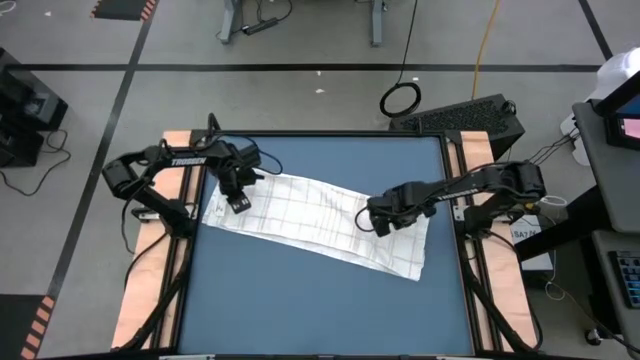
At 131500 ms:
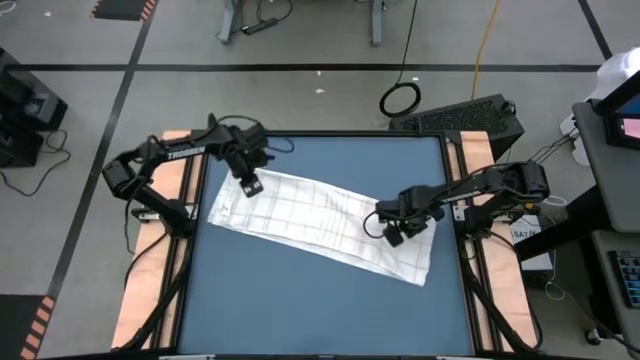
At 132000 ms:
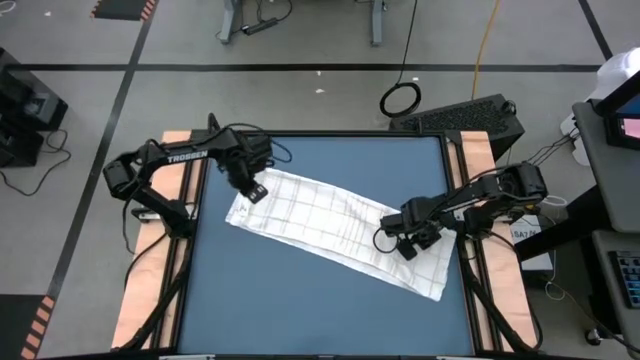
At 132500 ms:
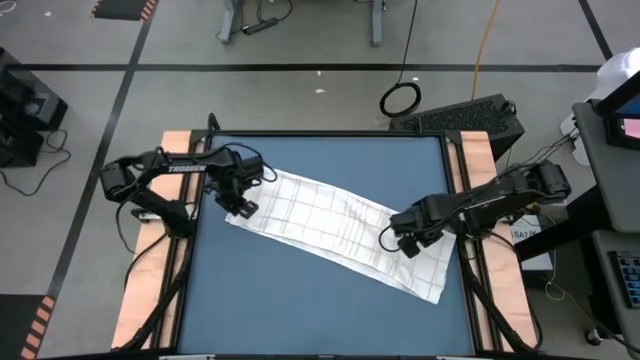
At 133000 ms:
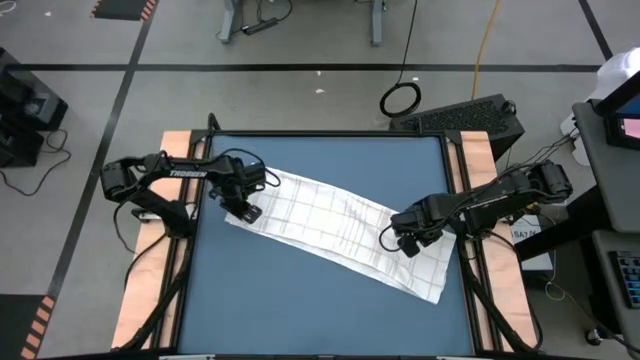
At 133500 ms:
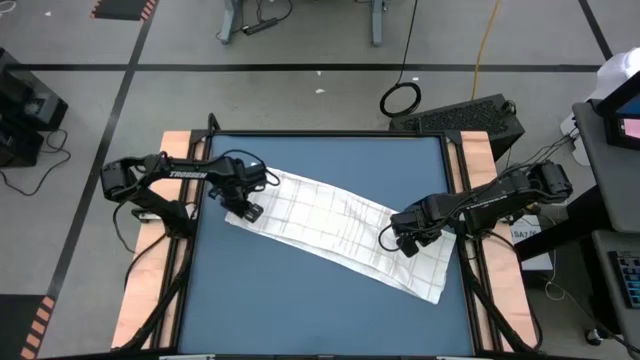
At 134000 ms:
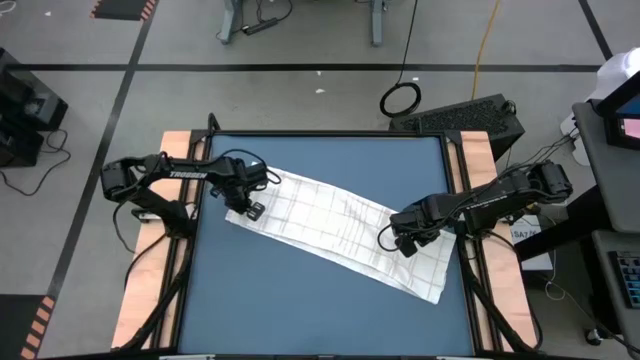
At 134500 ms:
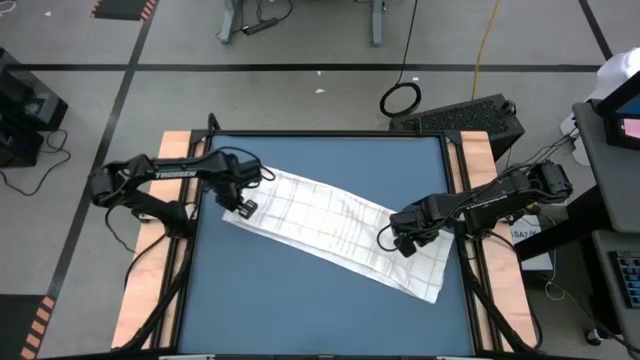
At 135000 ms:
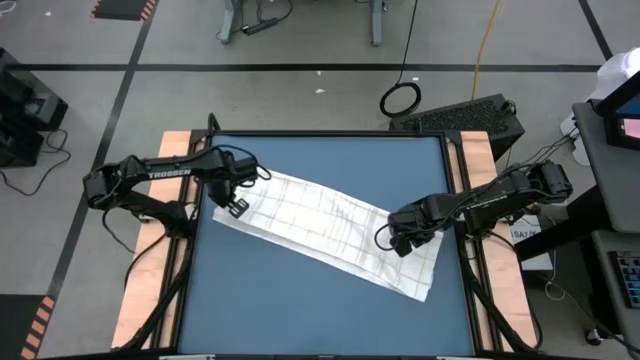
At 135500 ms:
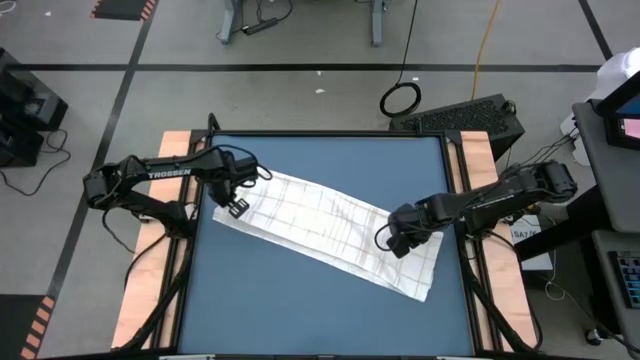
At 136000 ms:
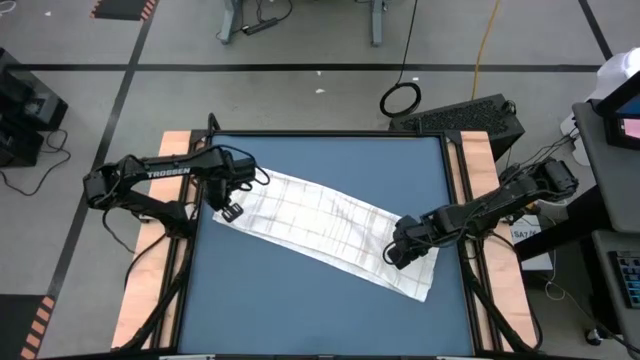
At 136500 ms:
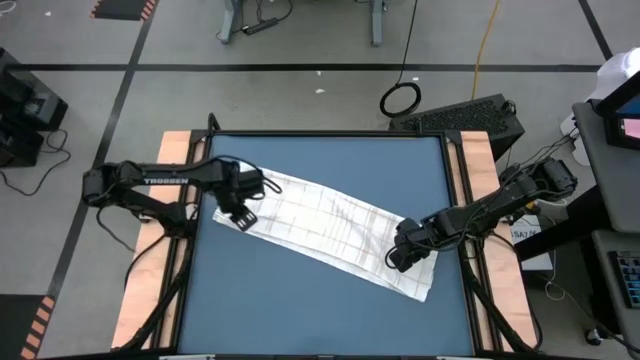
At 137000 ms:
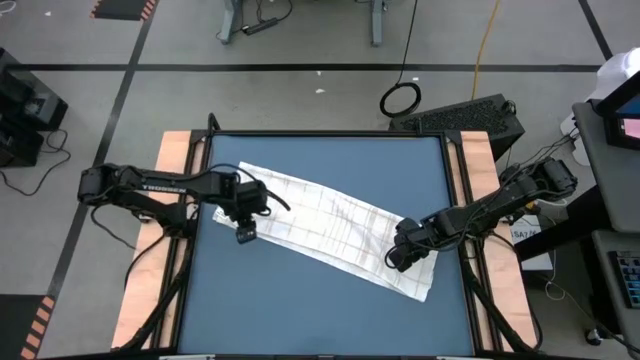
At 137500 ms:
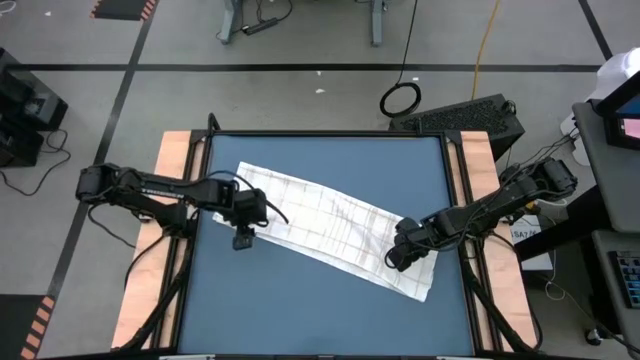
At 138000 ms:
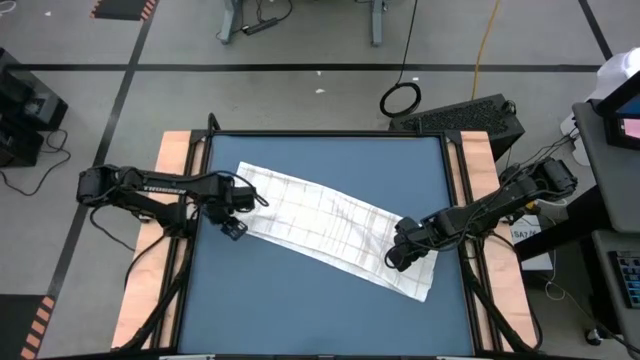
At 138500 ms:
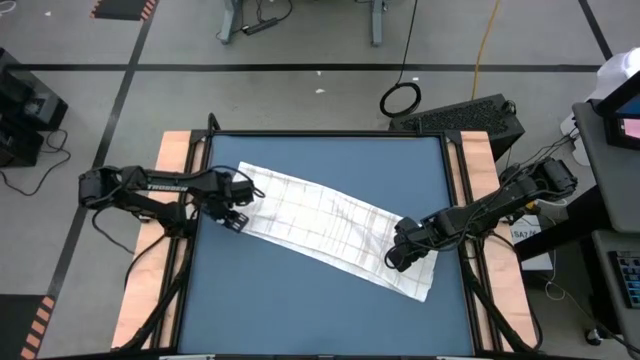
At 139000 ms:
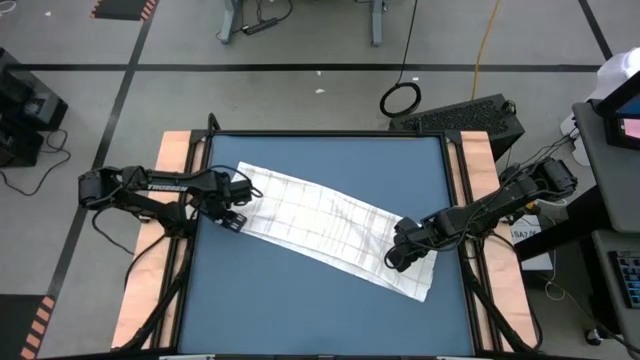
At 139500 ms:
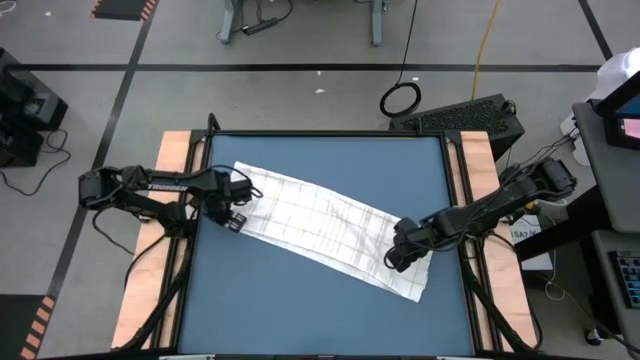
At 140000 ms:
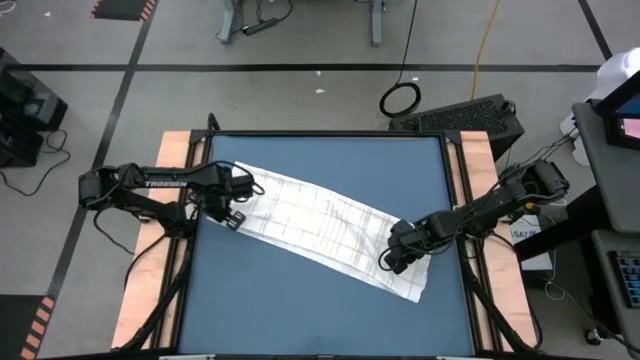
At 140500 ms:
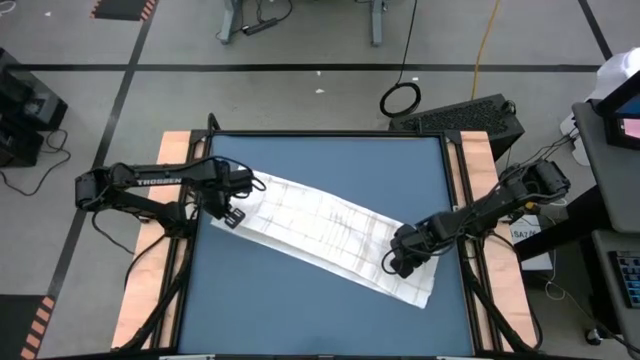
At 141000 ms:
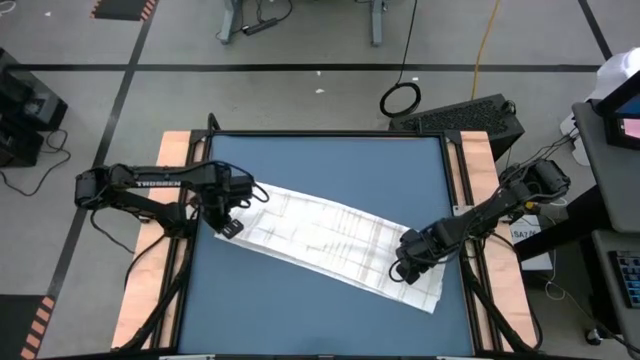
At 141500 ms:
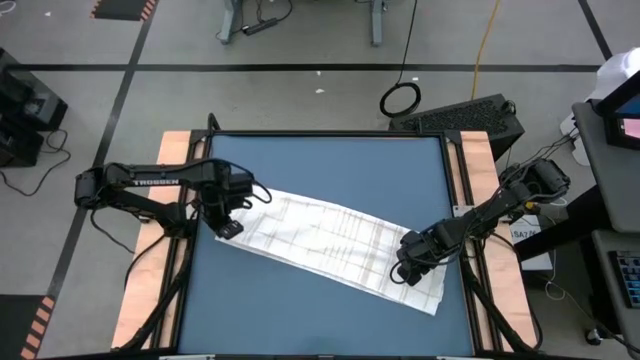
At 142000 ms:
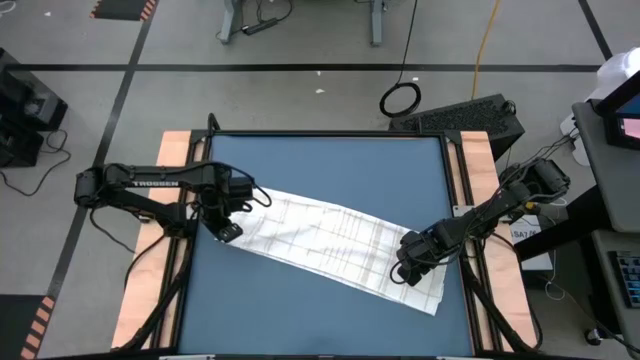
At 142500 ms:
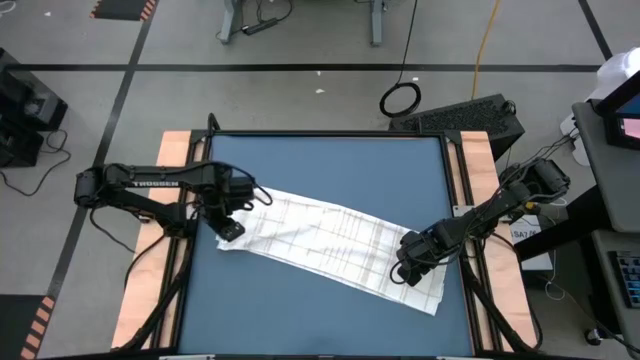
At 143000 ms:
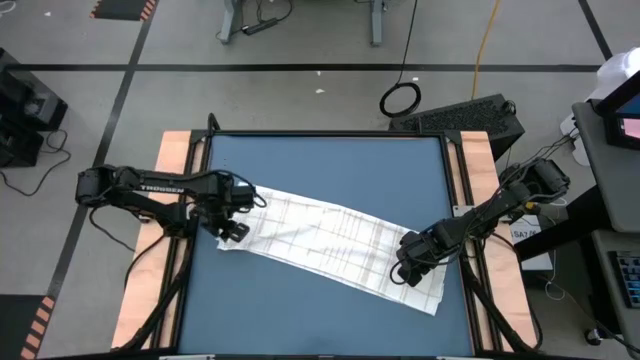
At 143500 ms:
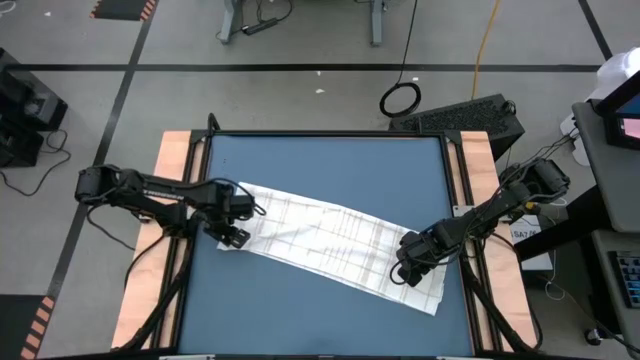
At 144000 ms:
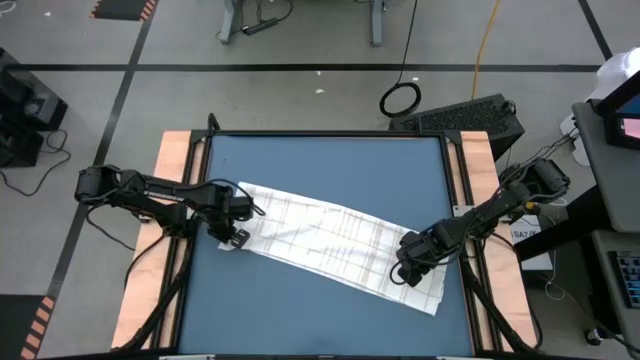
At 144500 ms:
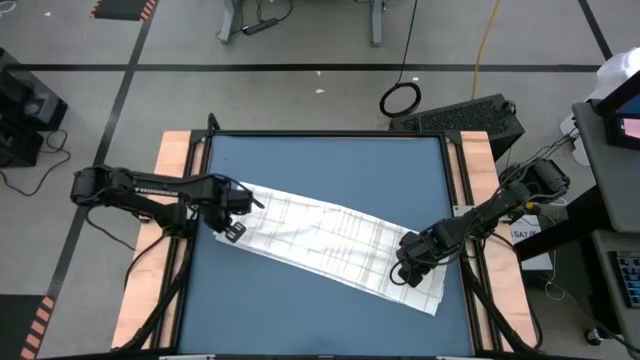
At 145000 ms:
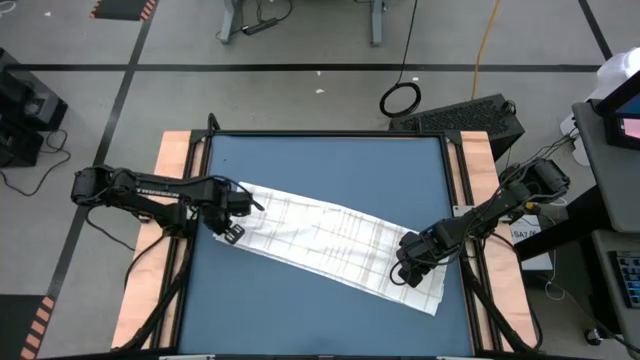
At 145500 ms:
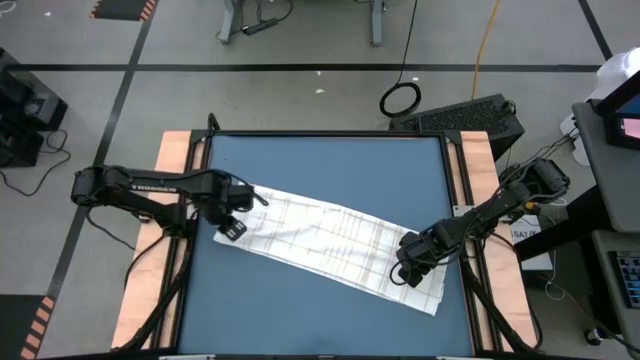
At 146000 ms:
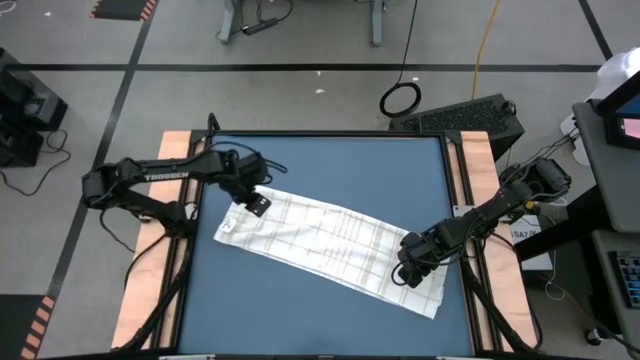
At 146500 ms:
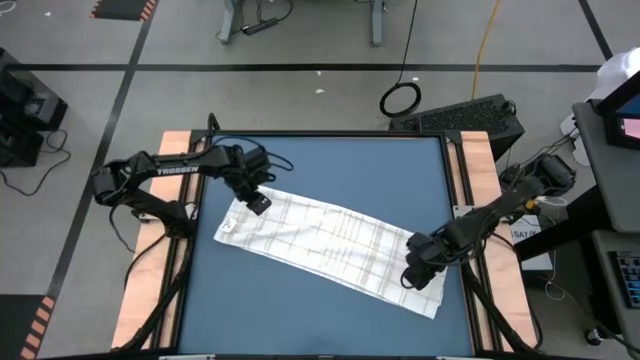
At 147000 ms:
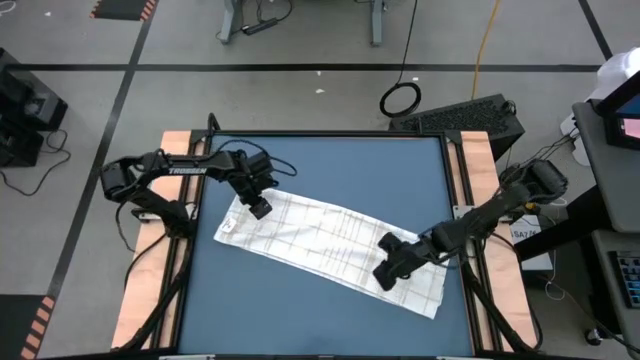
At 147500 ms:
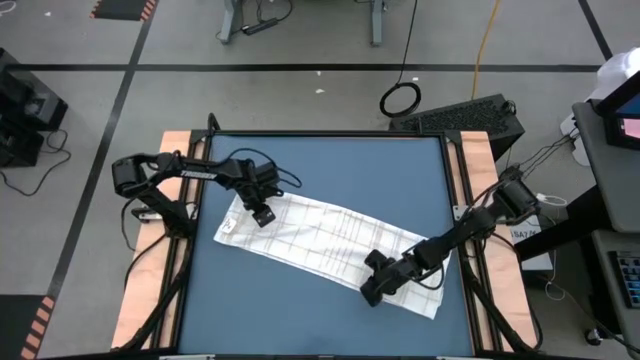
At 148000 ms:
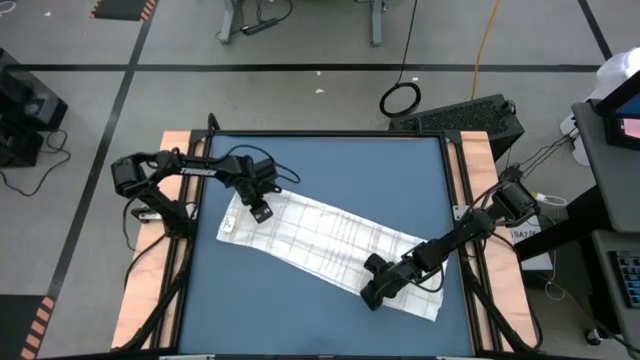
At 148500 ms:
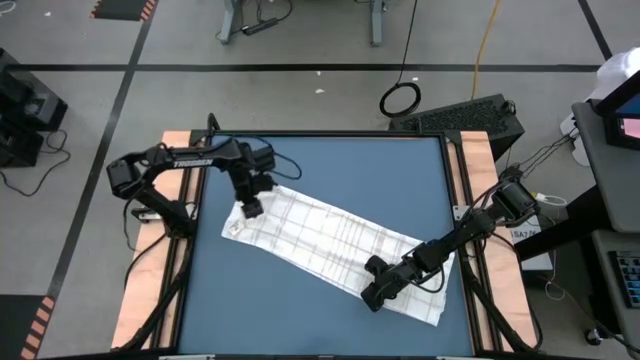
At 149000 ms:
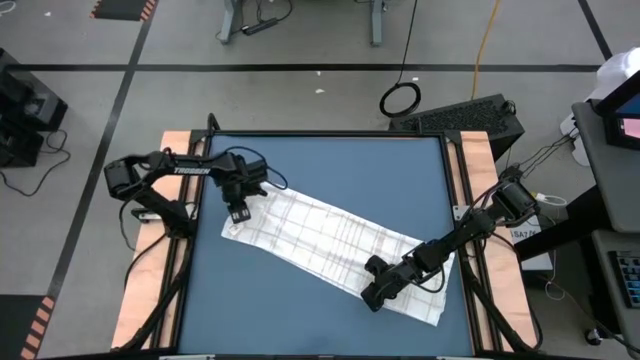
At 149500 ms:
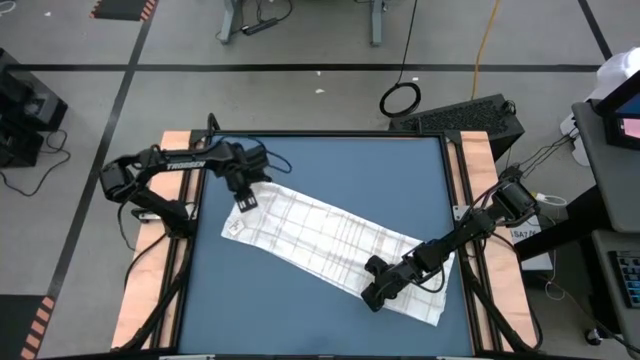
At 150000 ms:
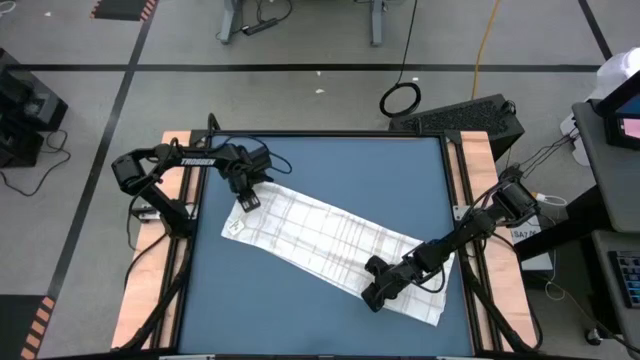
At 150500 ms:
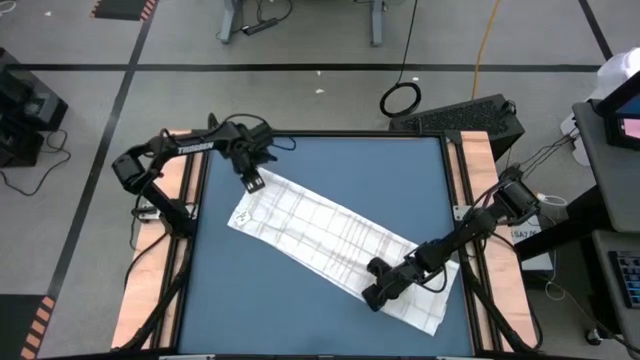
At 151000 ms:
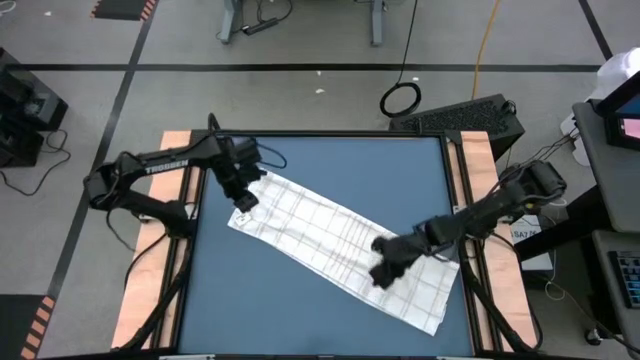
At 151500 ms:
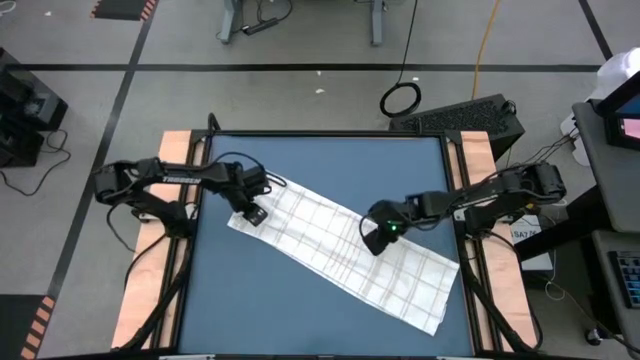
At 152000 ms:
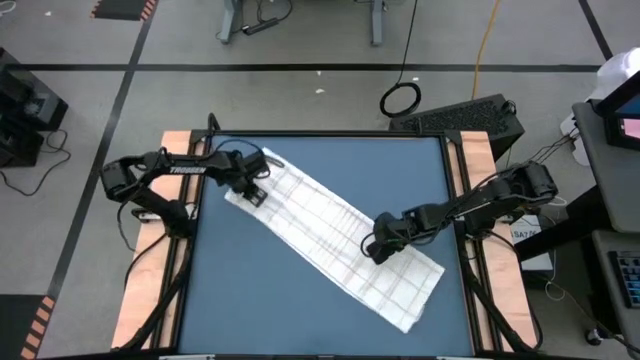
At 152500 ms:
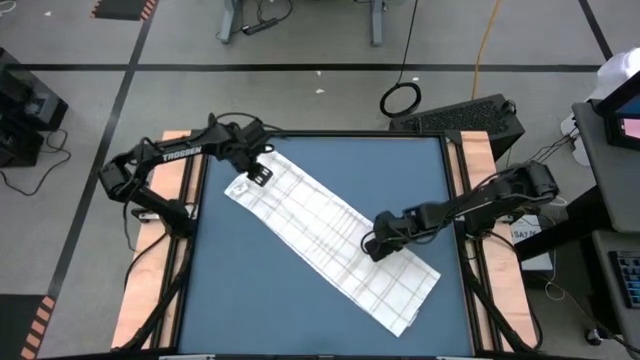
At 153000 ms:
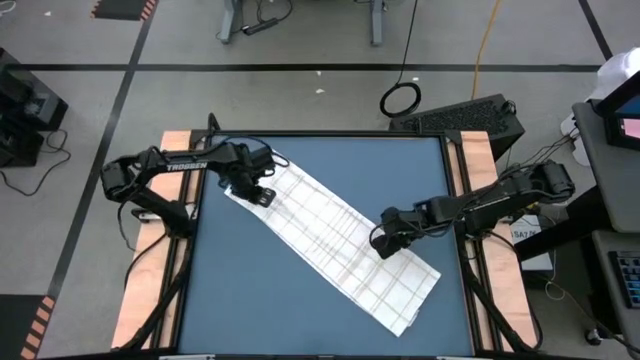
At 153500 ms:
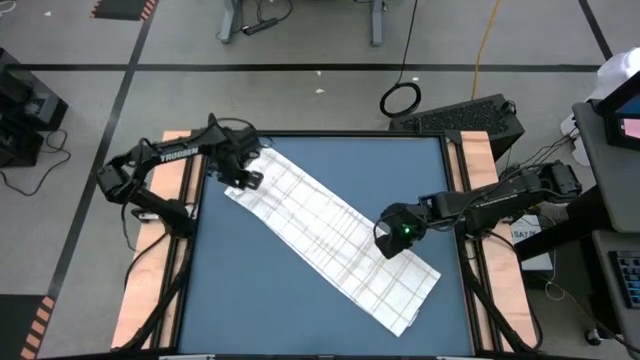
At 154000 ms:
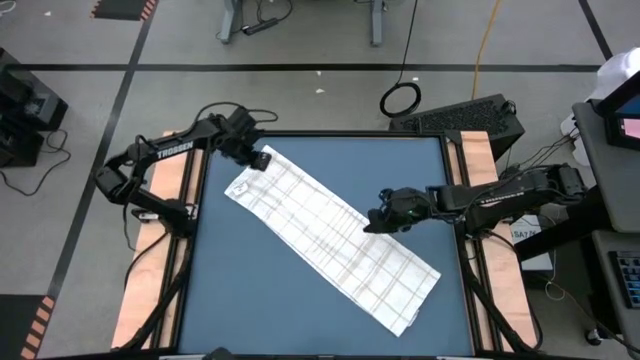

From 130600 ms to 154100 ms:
Task: Roll towel into tight, uniform cylinder
Roll the white towel
